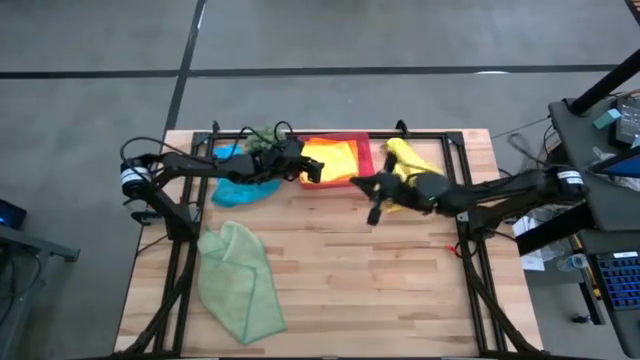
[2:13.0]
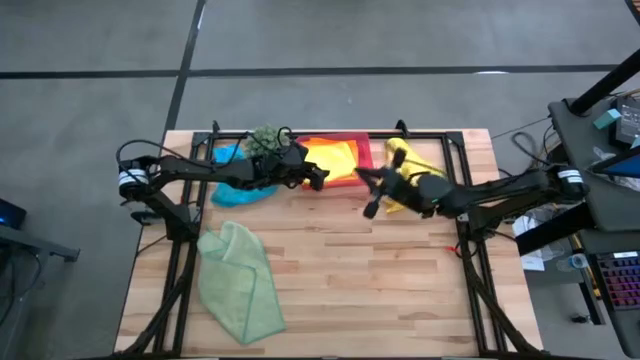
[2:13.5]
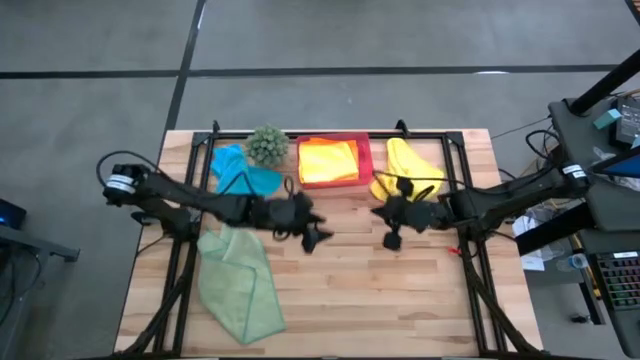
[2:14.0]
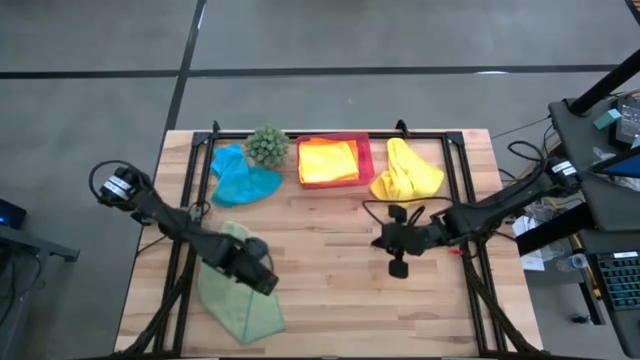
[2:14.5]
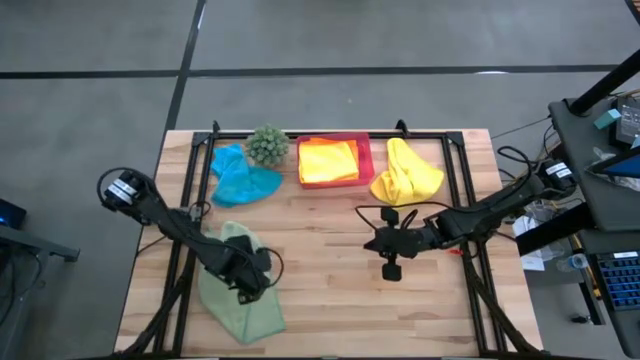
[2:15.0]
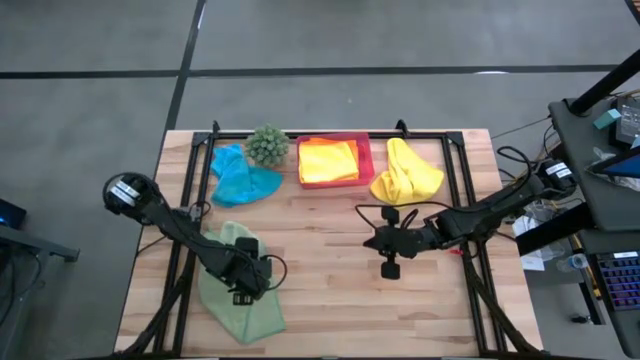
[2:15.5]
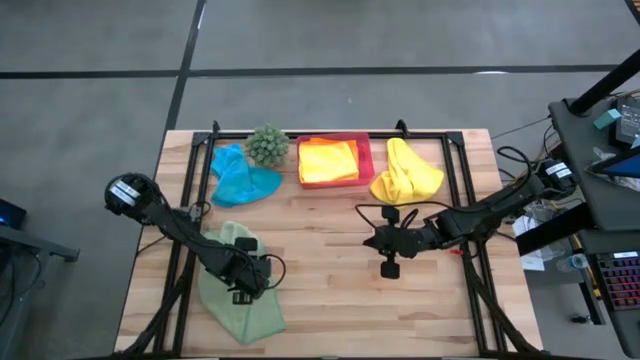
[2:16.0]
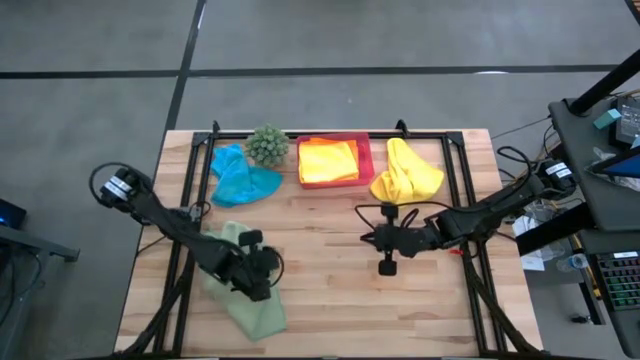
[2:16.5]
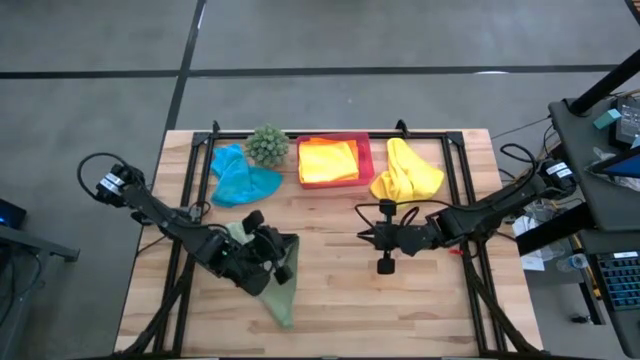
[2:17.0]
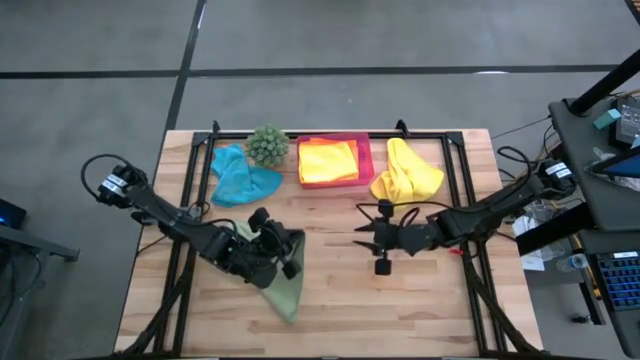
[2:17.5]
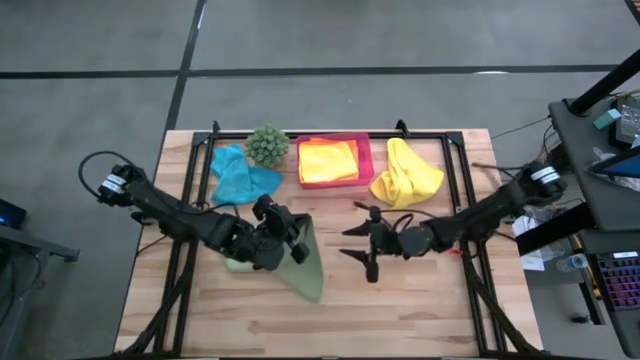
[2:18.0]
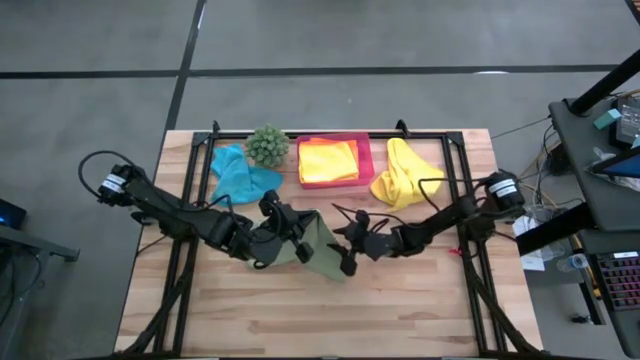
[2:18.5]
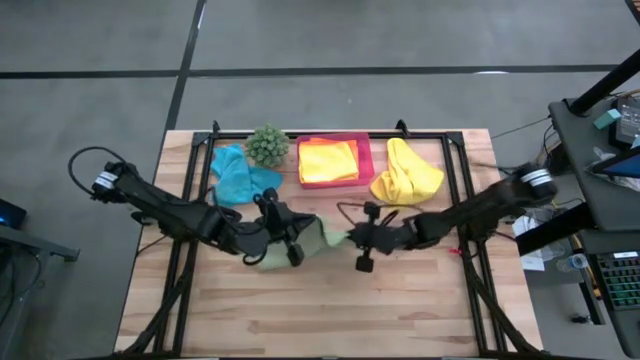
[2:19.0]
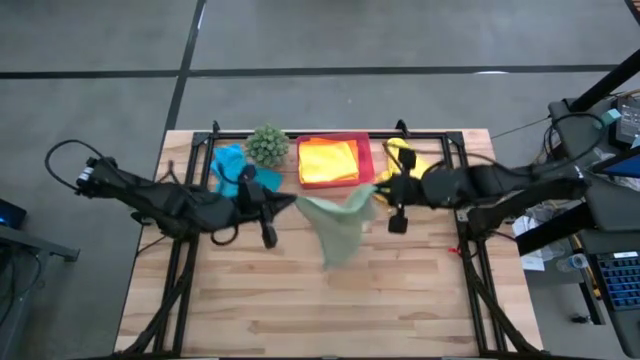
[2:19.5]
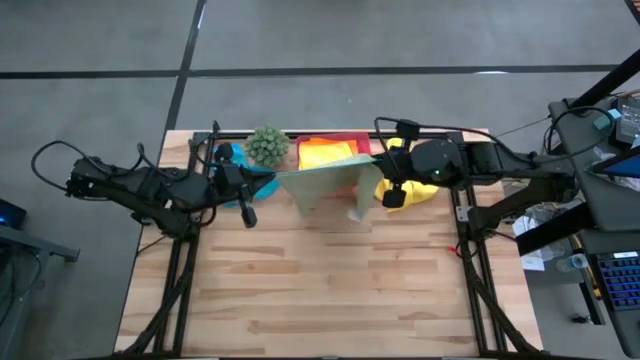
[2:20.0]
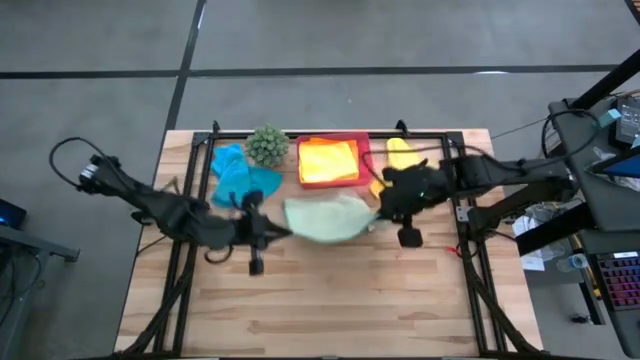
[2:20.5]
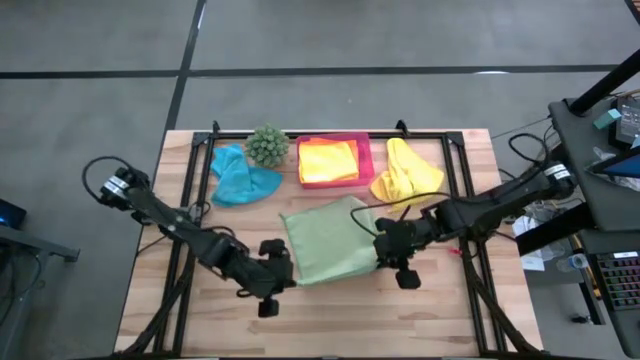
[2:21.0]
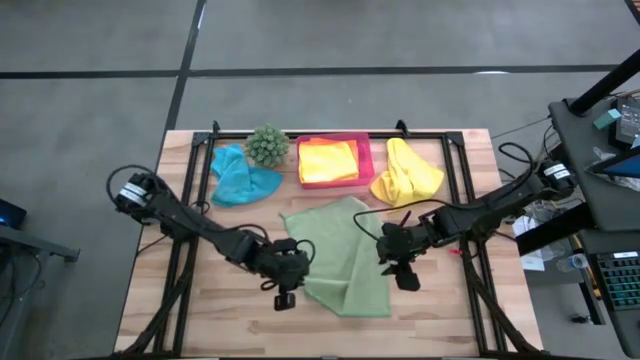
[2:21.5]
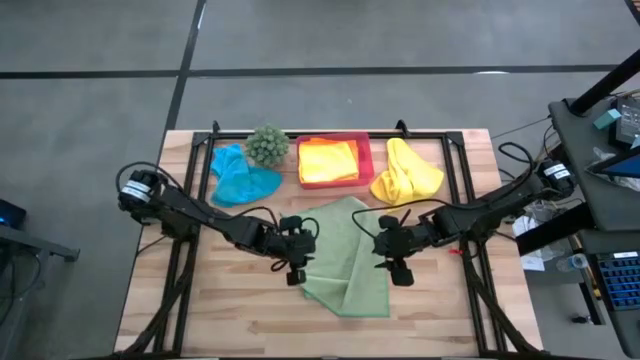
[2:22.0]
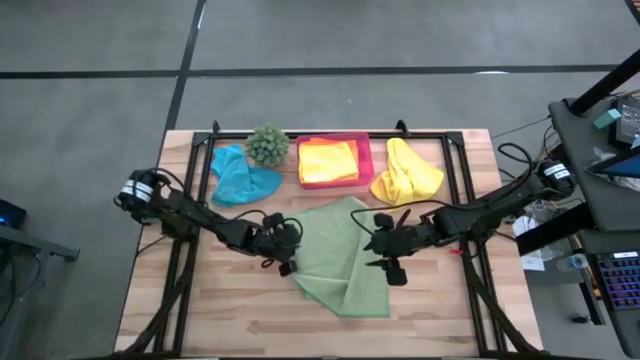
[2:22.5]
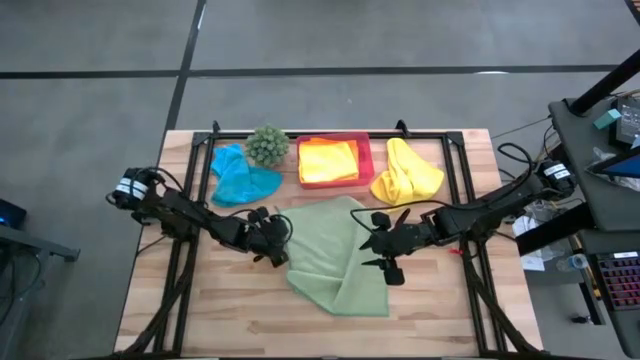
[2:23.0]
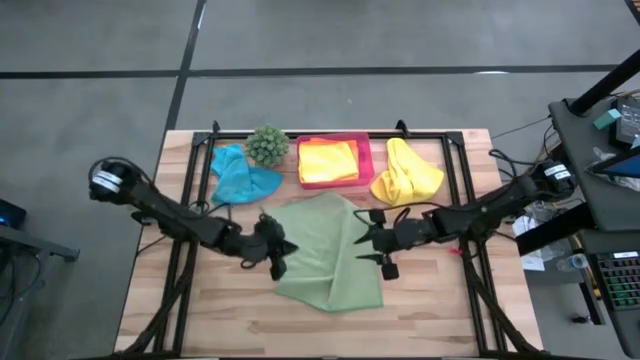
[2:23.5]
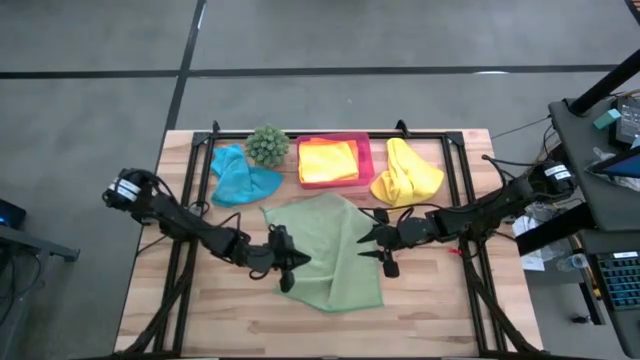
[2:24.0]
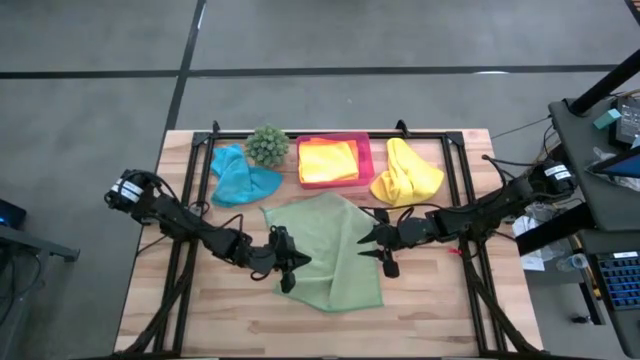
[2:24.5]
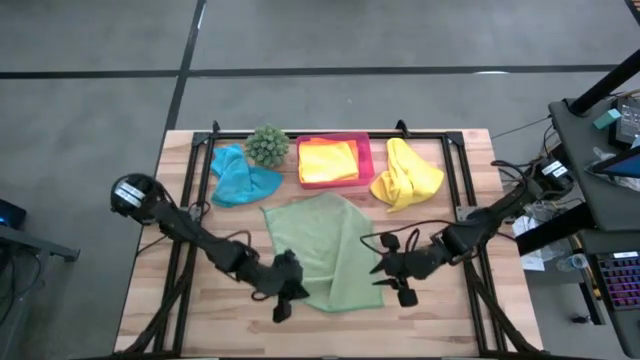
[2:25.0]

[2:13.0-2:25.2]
Task: Fold microfiber towels
Fold the green microfiber towel

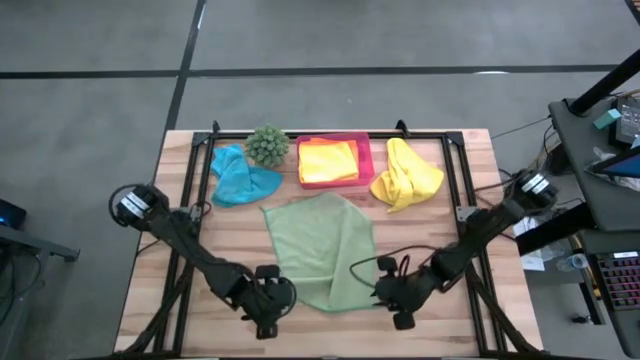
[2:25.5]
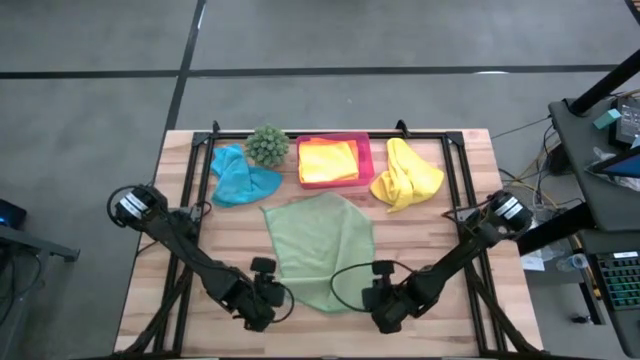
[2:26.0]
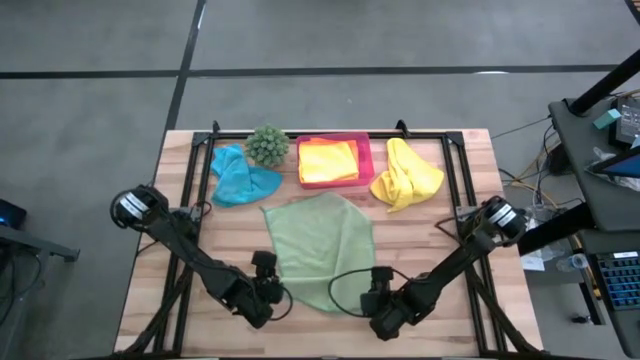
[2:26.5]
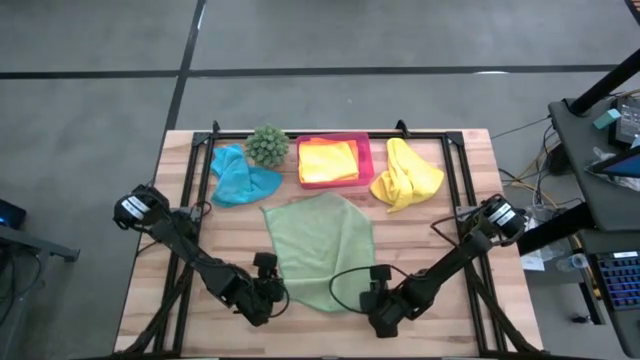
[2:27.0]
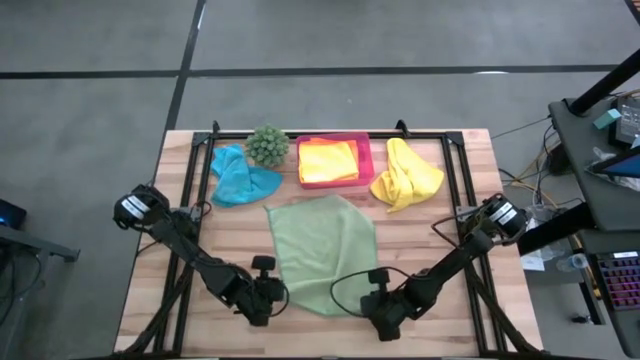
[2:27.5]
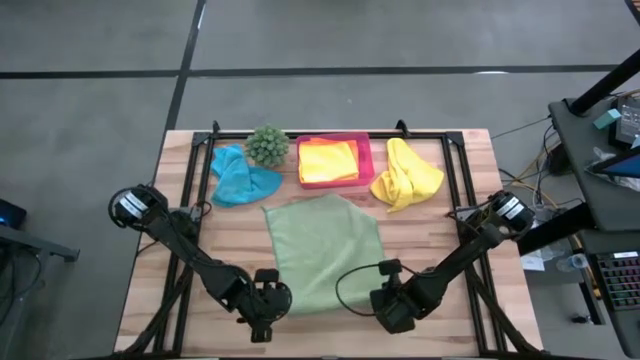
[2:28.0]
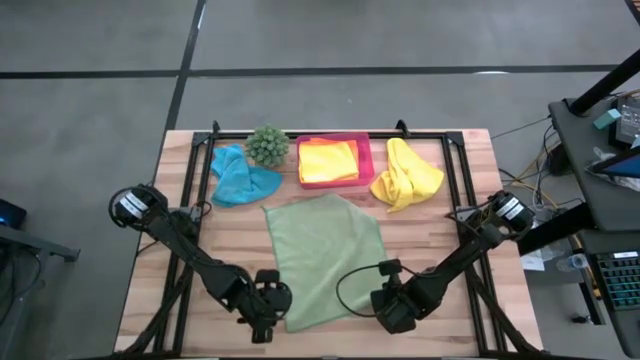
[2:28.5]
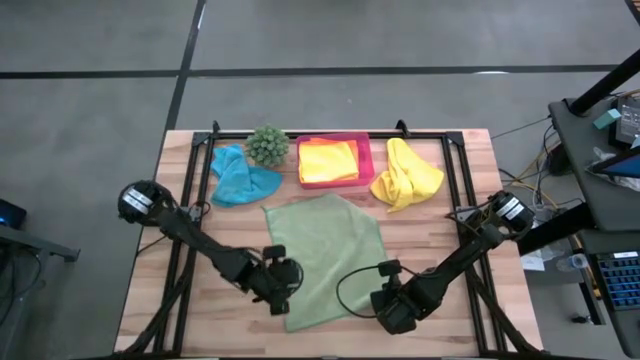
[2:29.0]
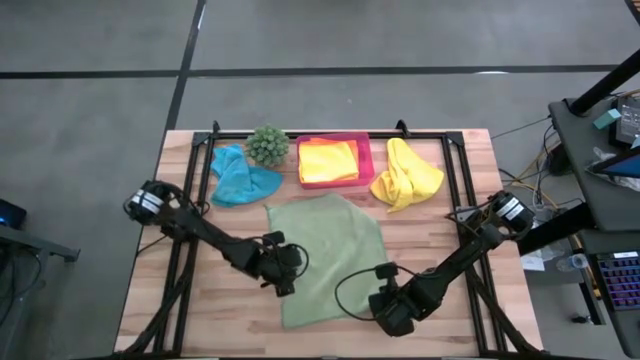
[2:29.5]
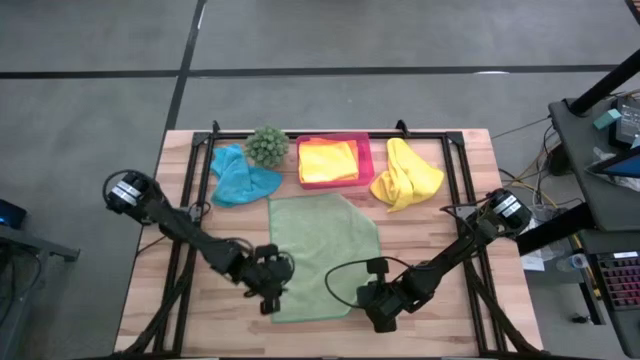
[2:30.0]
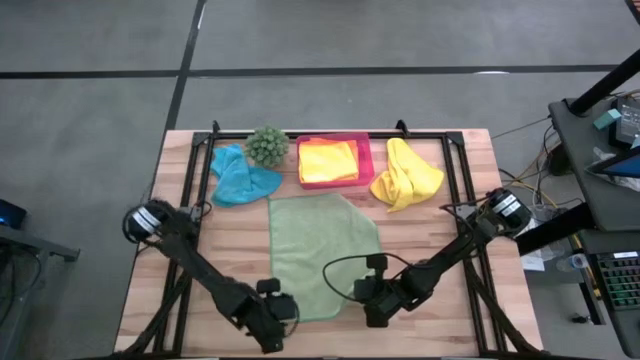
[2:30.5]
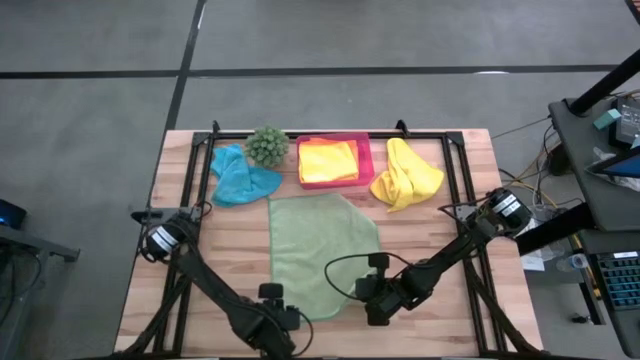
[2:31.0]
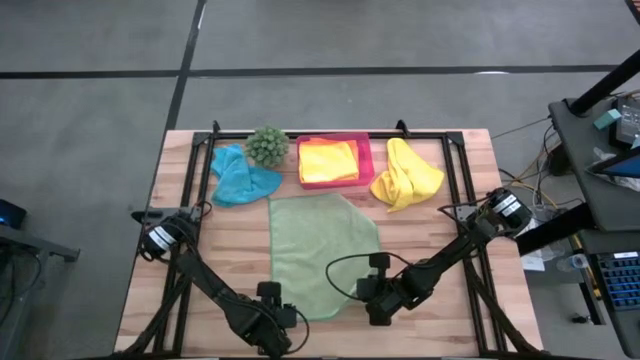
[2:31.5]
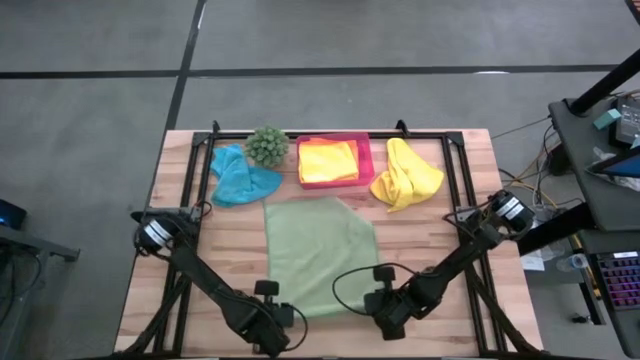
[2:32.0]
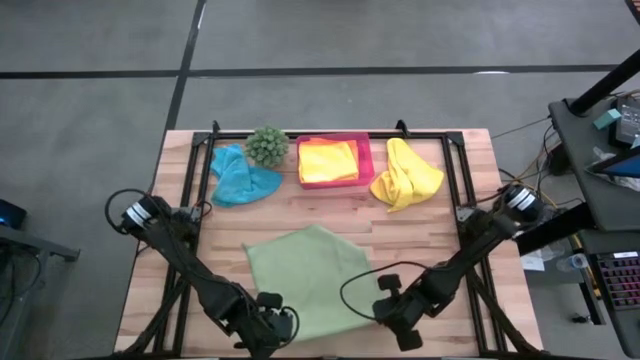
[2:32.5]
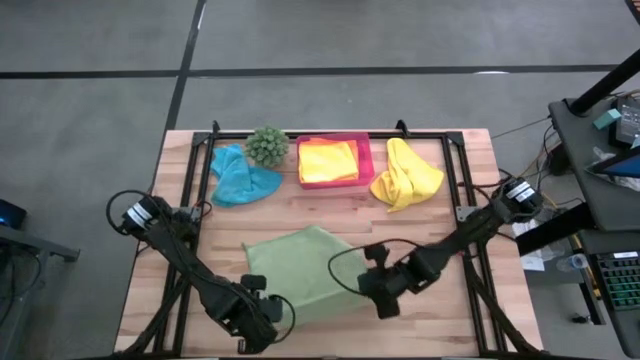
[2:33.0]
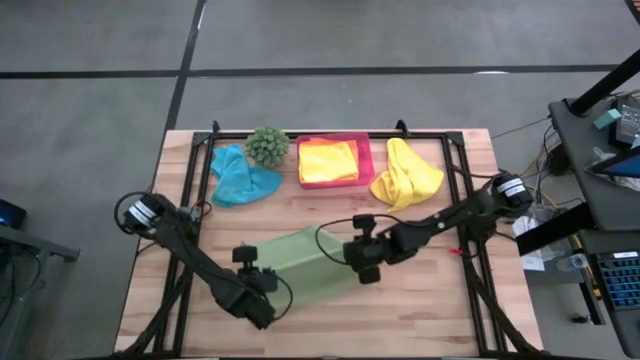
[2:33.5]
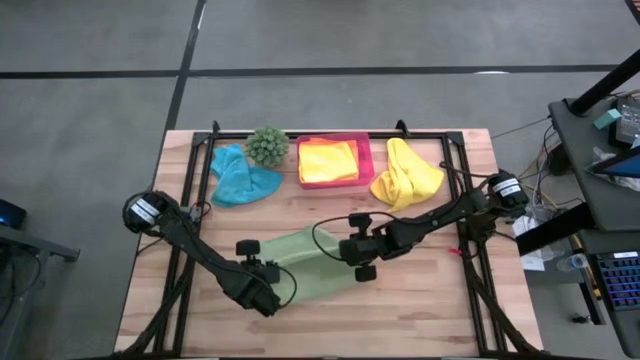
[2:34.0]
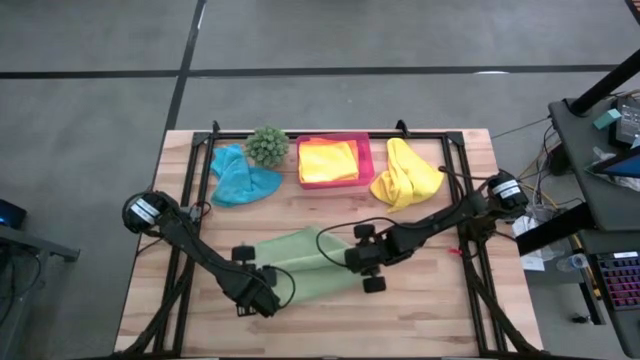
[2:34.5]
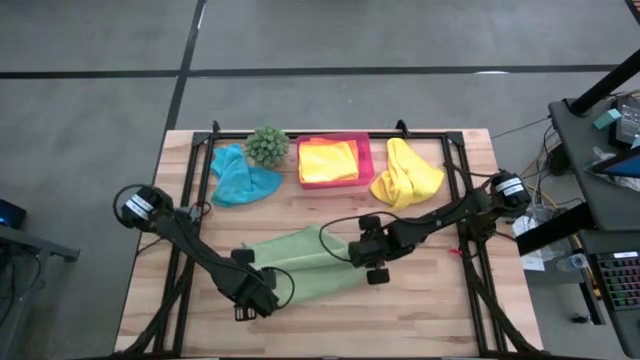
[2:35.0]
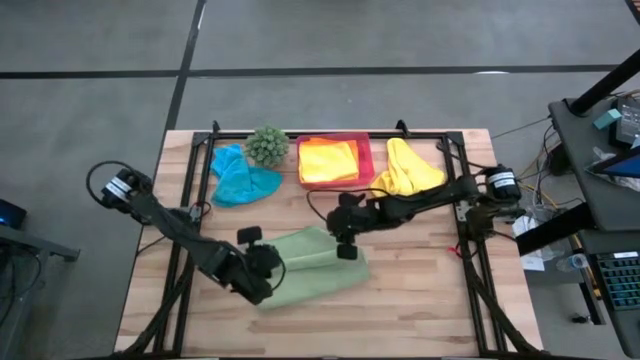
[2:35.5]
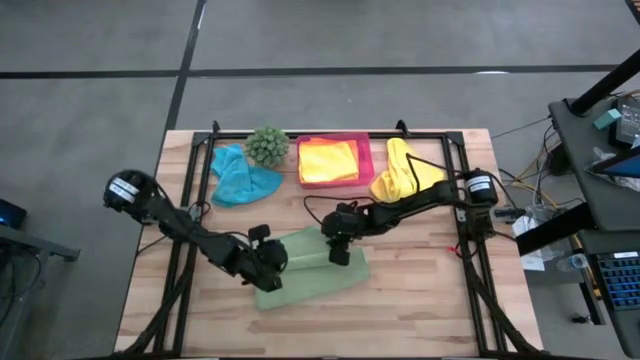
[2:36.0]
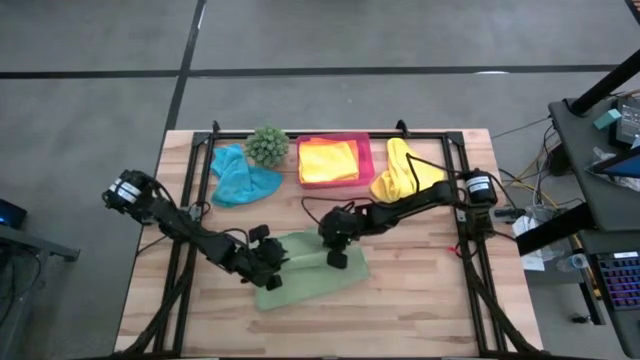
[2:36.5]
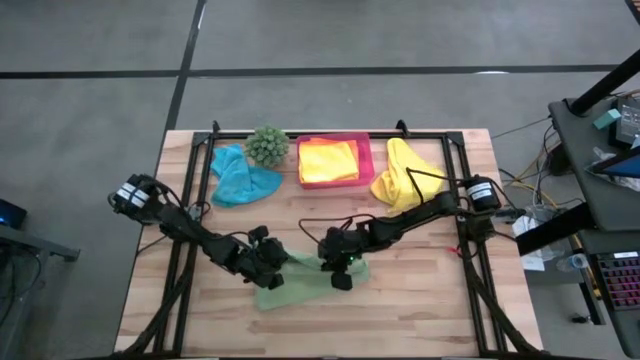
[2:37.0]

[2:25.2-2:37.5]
Fold the green microfiber towel
